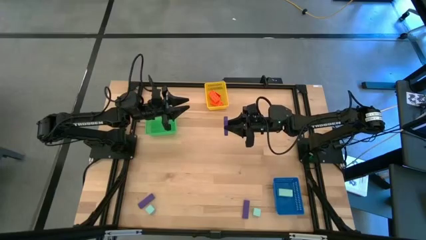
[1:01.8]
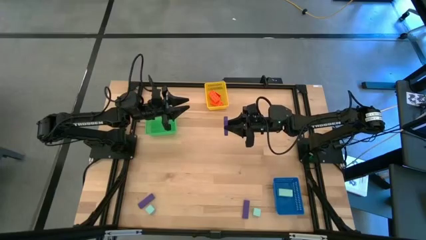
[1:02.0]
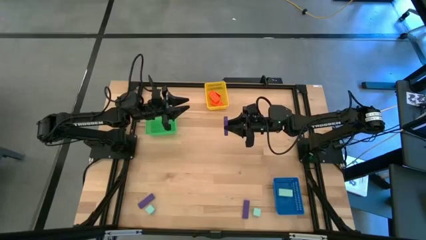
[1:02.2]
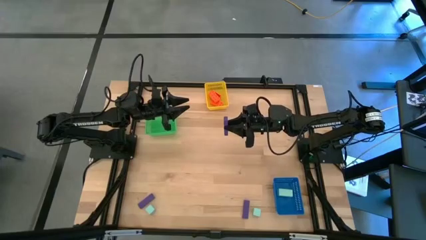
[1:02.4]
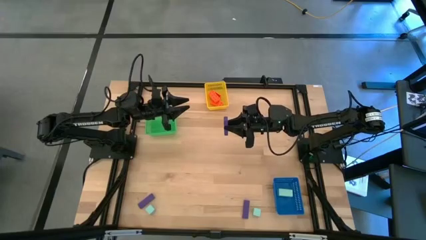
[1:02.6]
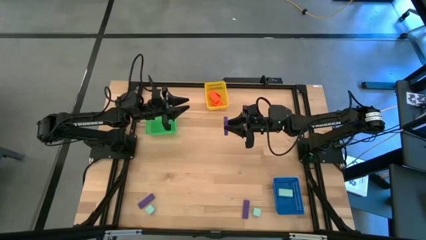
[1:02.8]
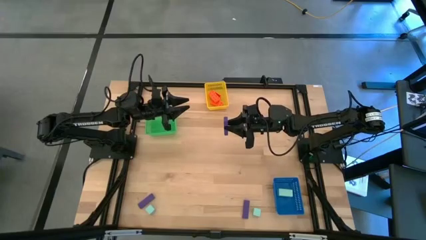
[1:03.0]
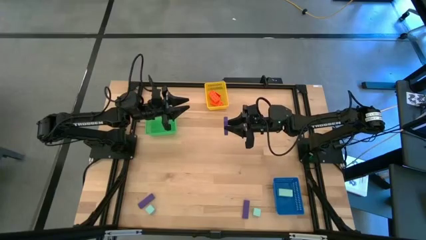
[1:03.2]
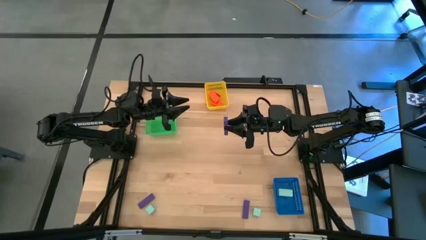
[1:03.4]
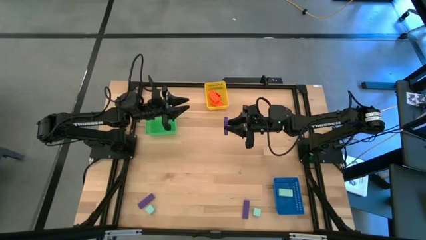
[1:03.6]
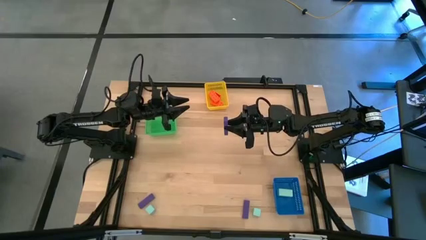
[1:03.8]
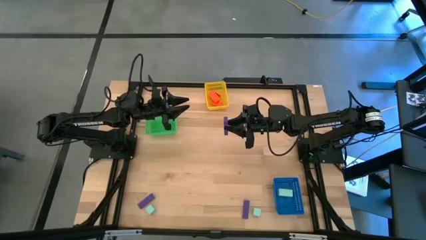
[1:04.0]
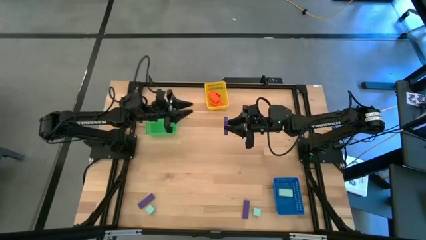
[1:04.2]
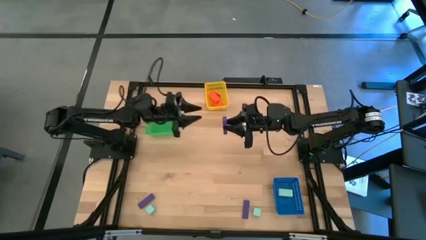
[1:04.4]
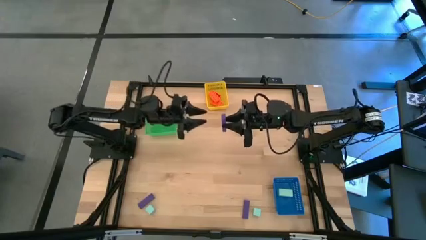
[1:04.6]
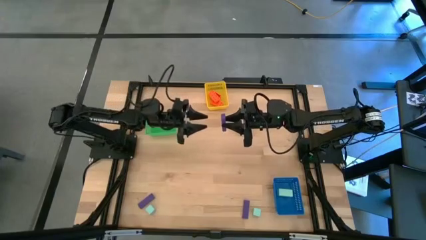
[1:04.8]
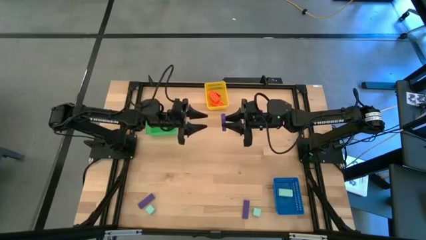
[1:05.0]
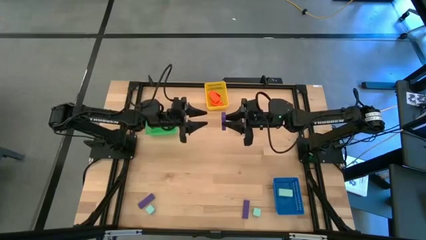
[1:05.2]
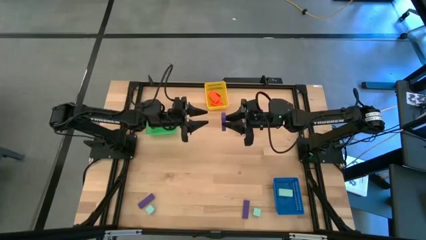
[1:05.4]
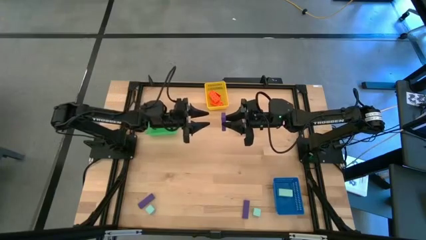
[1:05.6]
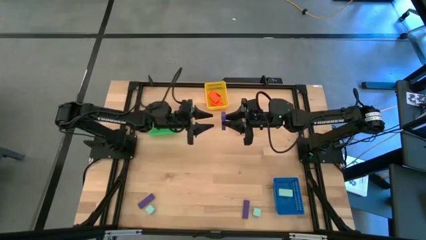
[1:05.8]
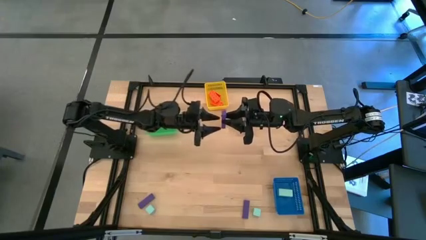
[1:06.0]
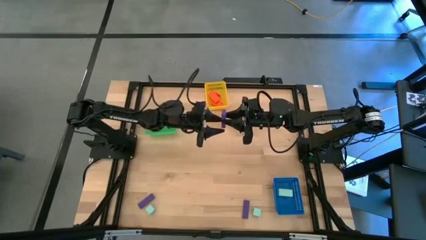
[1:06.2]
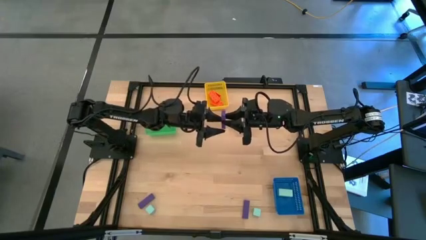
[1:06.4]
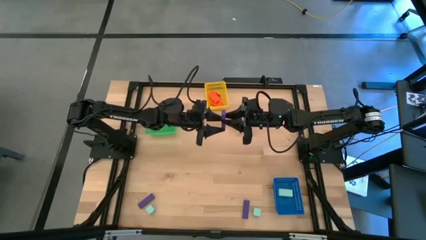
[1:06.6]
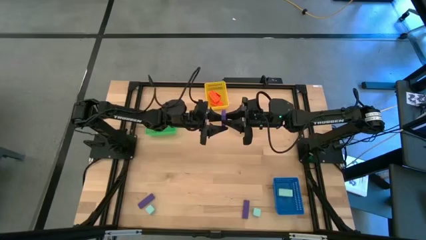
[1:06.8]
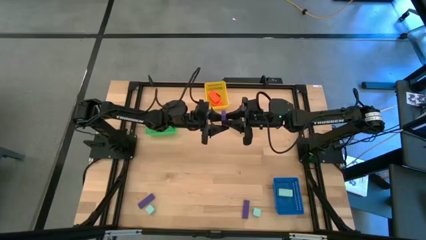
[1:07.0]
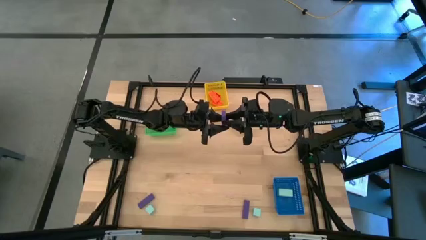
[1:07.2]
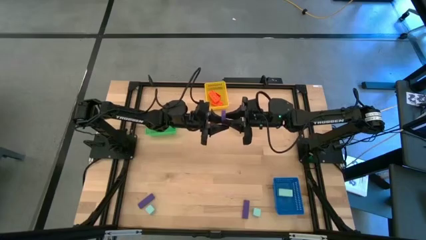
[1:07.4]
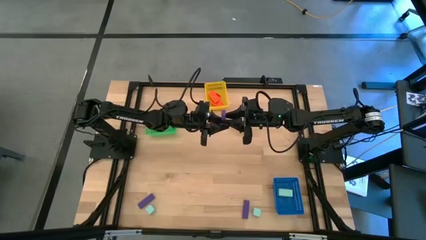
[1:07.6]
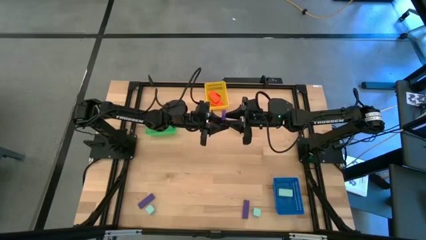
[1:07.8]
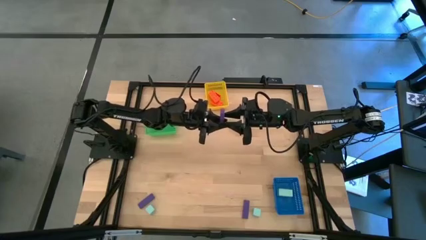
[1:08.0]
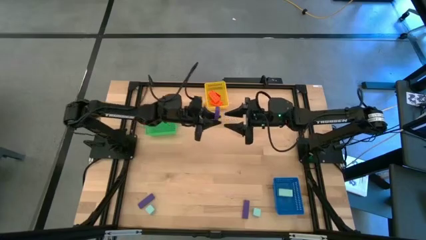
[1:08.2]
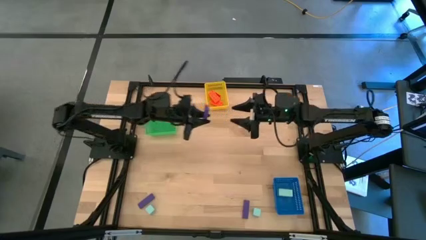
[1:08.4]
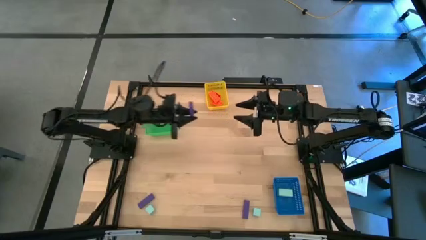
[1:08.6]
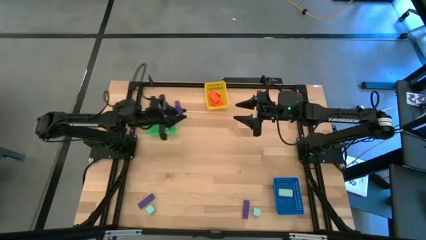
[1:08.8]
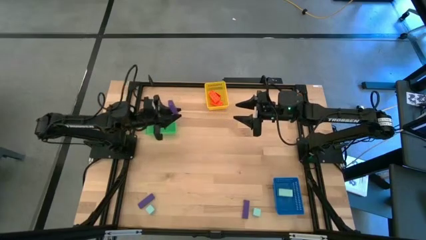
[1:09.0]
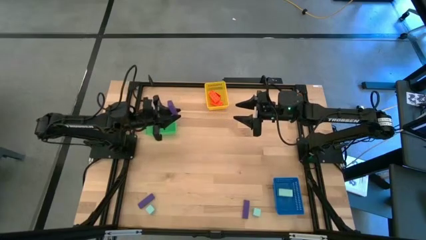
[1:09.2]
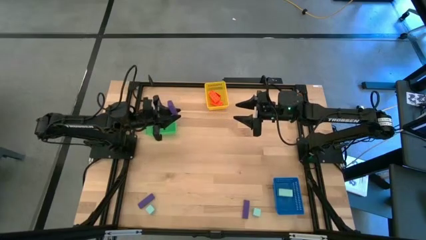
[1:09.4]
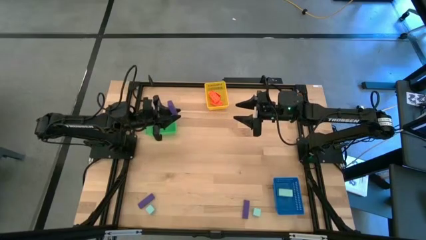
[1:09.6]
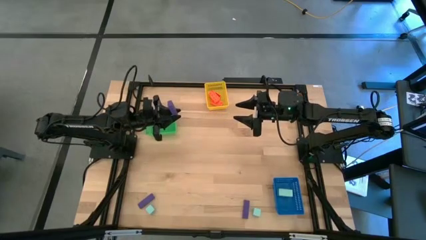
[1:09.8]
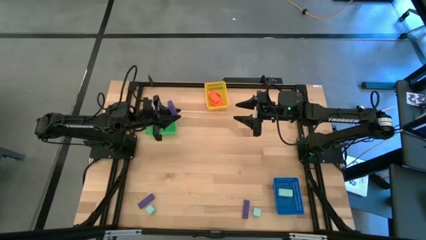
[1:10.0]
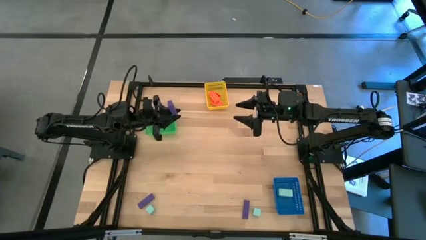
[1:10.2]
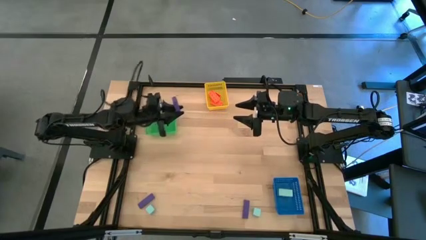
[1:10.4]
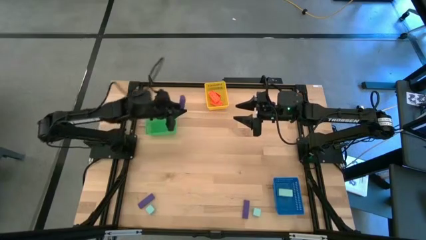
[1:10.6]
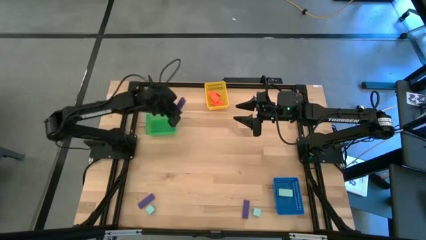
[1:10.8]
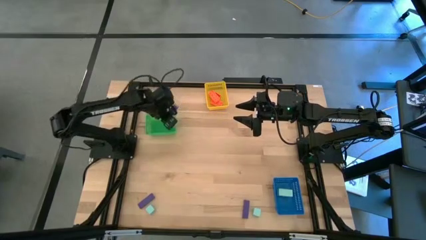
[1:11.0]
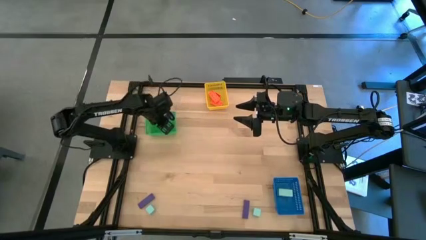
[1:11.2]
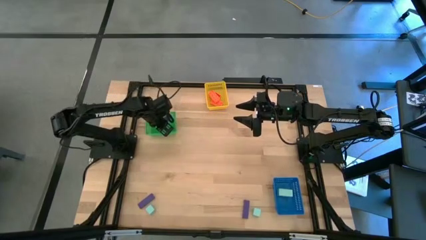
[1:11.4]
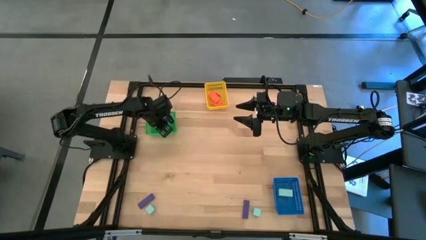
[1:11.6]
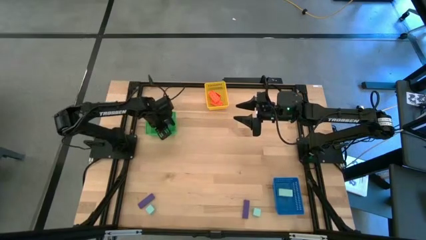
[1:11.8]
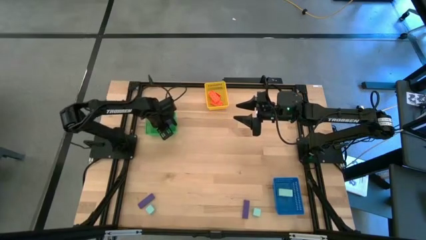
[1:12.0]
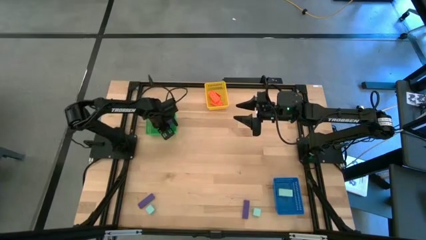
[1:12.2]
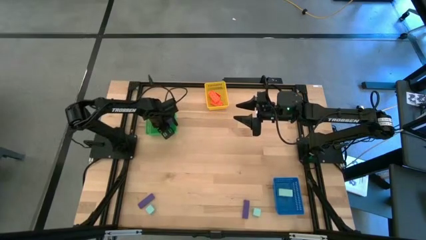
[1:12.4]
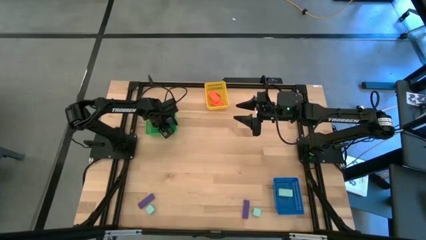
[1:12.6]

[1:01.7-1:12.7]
Task: Sort & place blocks by color
Put the top right violet block into the green bin

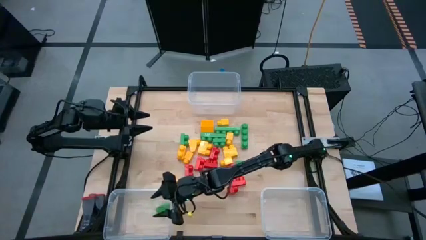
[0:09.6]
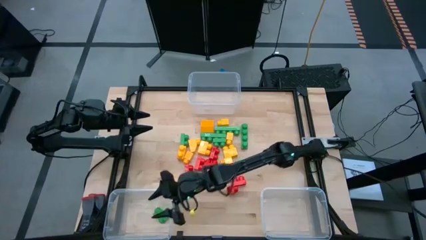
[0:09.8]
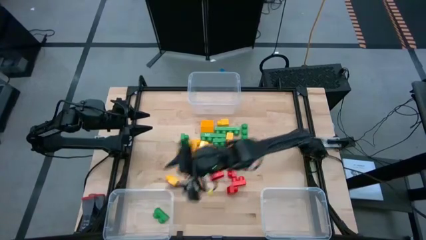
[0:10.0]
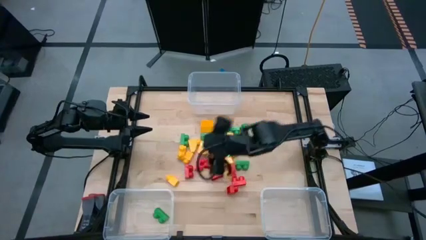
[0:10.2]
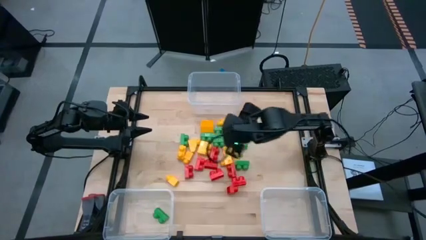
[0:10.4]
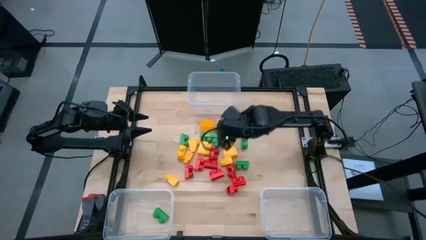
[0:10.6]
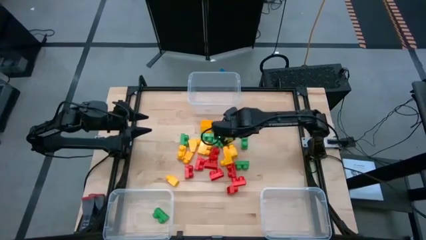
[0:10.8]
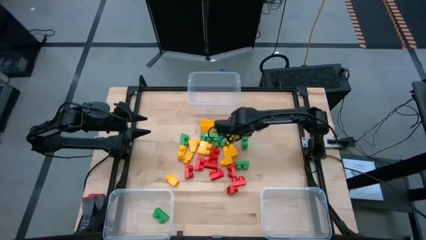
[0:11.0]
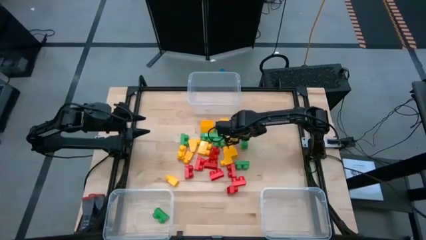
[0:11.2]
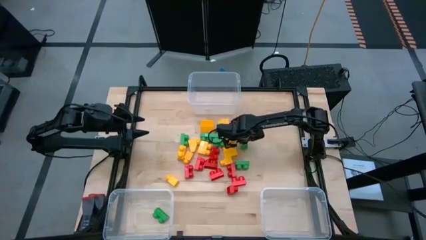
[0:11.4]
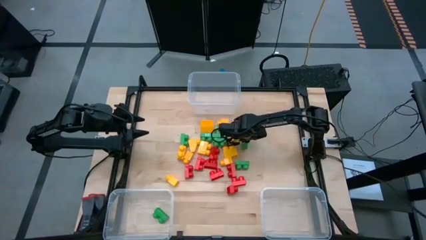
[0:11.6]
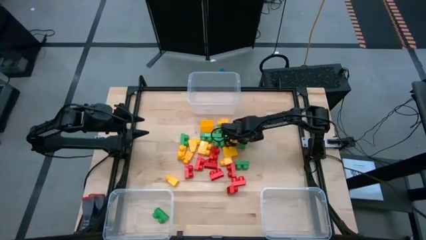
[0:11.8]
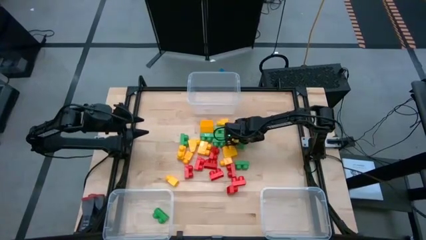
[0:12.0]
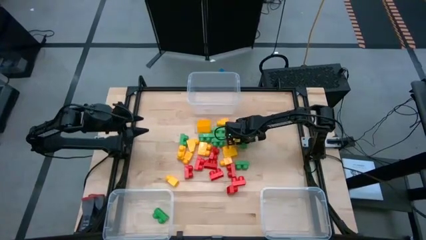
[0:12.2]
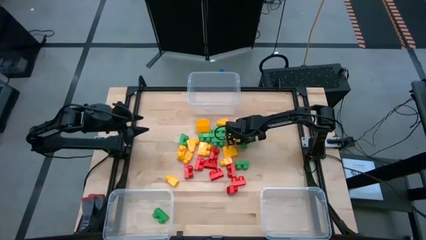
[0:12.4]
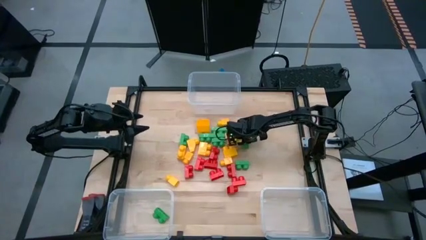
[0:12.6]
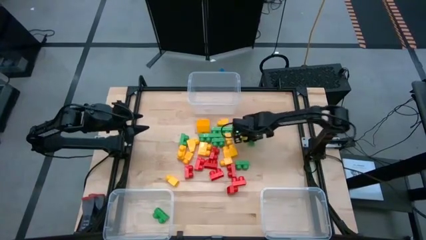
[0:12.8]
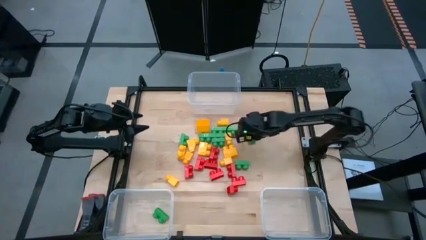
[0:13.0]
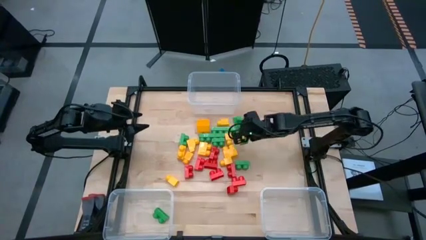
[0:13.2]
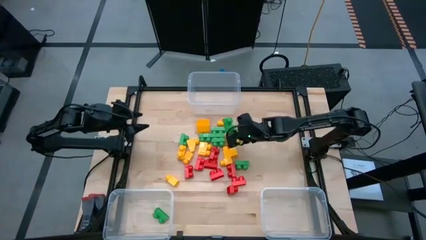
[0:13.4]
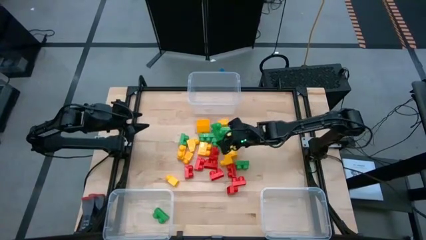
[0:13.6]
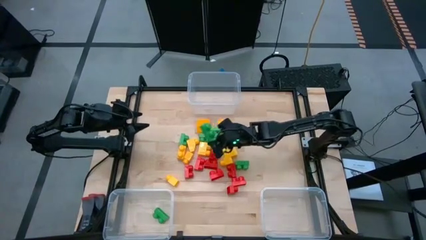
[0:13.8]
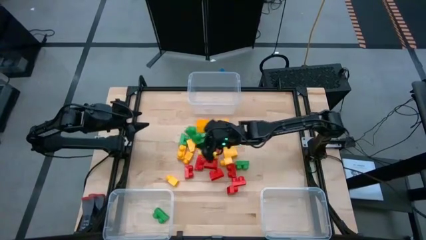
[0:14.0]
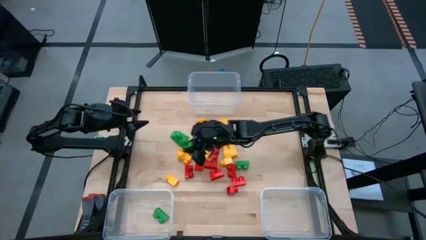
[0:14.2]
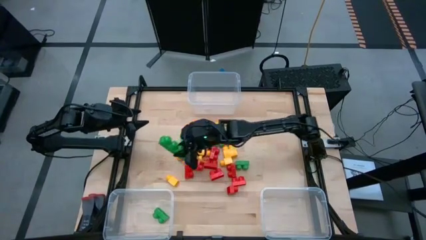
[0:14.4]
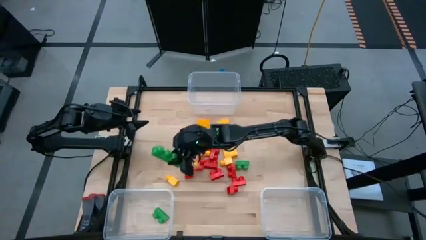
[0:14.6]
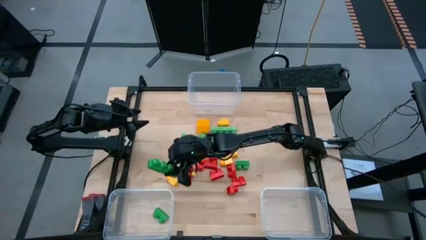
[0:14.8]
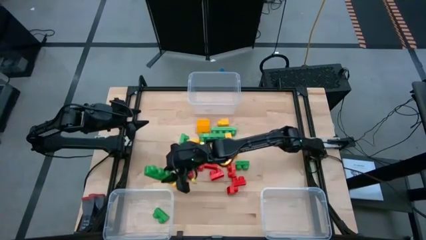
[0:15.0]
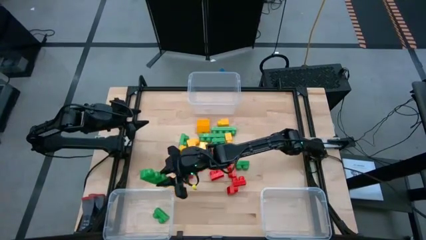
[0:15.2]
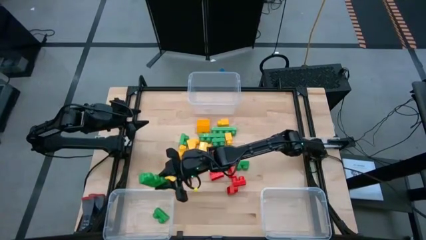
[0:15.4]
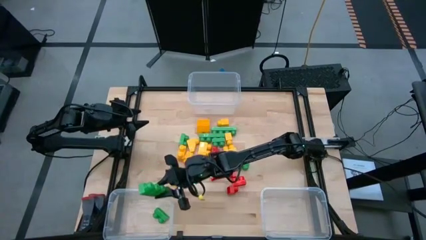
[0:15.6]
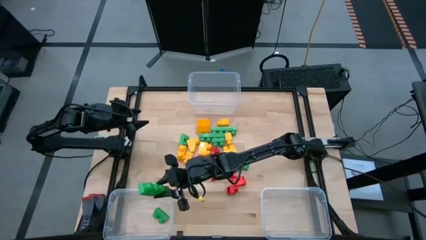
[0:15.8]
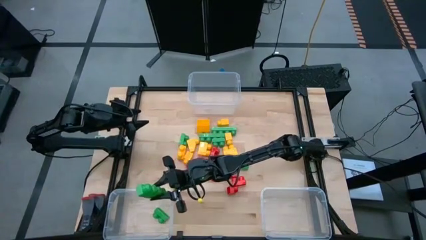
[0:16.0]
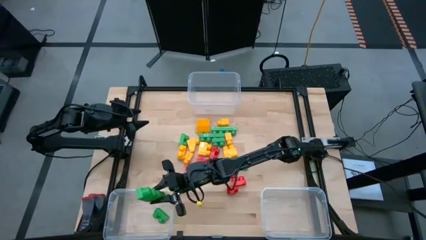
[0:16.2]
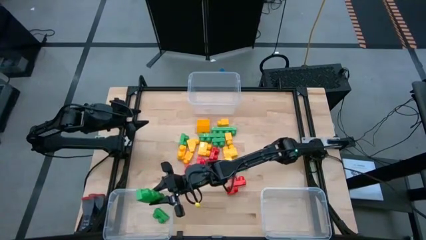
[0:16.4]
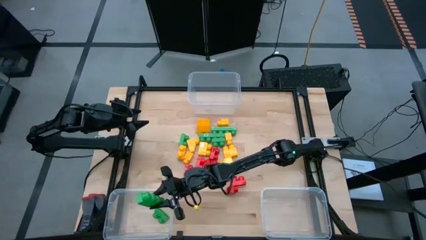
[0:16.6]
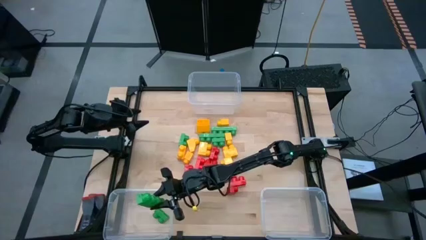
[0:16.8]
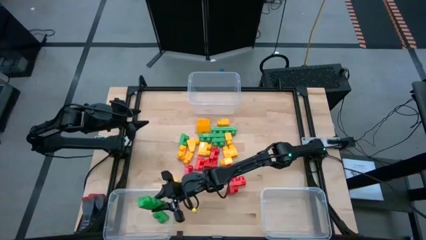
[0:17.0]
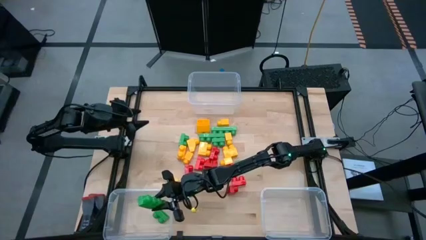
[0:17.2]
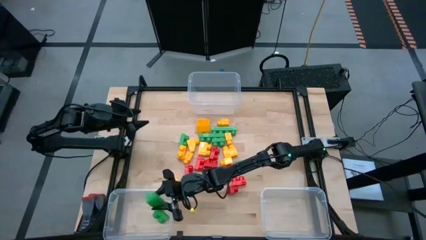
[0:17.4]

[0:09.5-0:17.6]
Task: Sort blocks
Put the green game piece into the bottom left transparent bin
